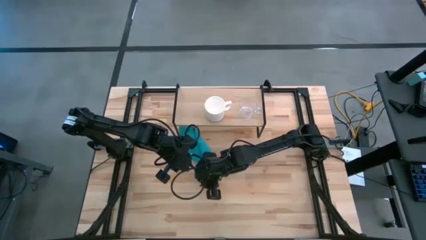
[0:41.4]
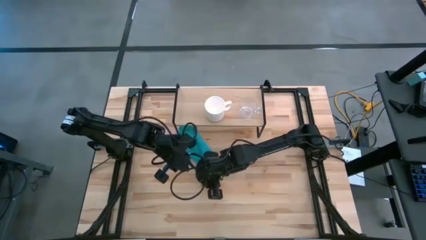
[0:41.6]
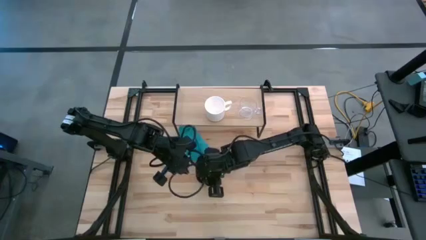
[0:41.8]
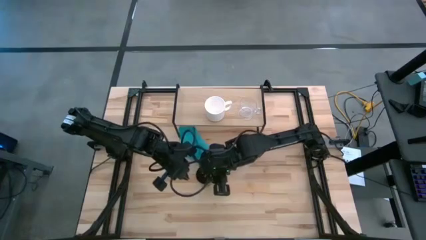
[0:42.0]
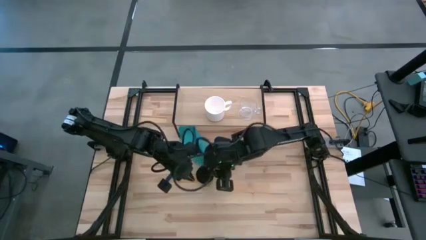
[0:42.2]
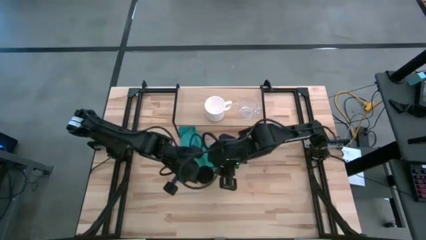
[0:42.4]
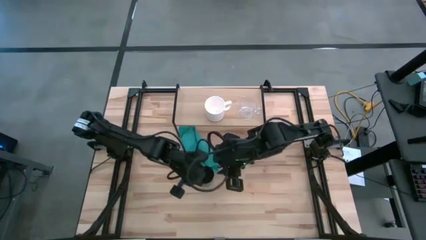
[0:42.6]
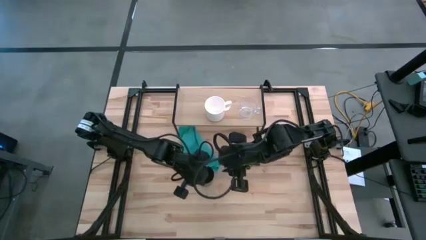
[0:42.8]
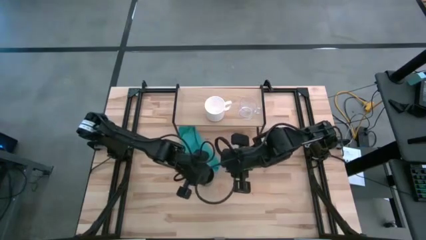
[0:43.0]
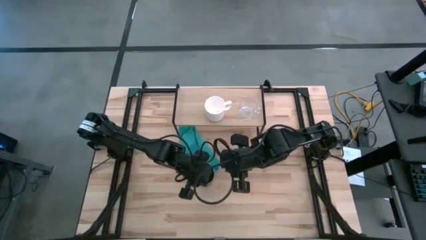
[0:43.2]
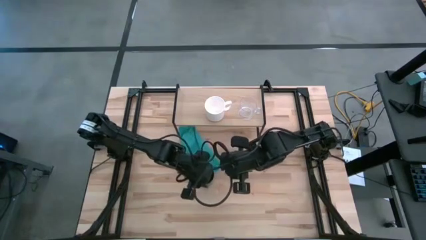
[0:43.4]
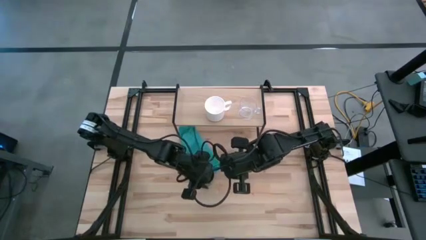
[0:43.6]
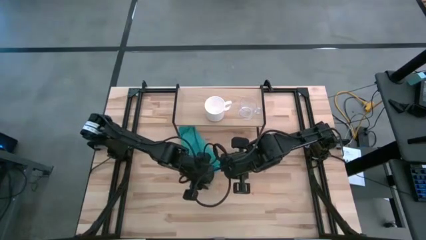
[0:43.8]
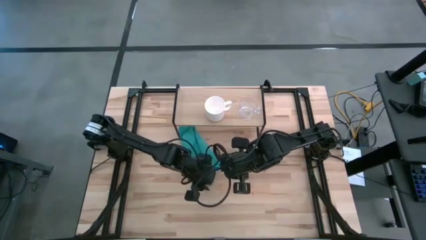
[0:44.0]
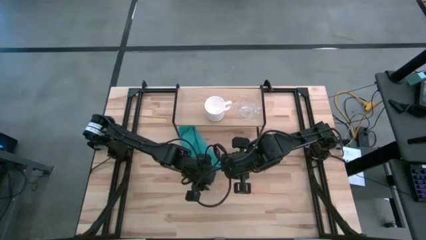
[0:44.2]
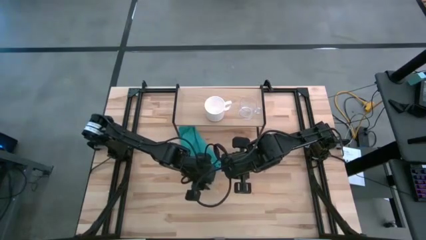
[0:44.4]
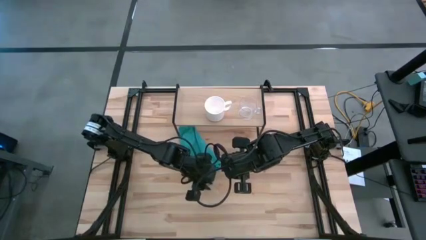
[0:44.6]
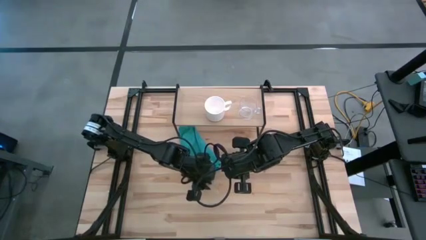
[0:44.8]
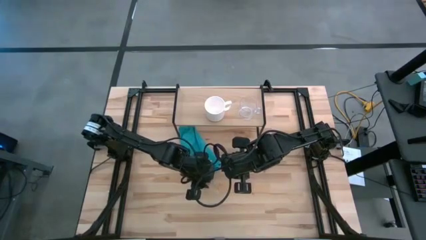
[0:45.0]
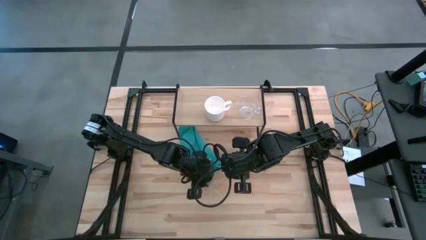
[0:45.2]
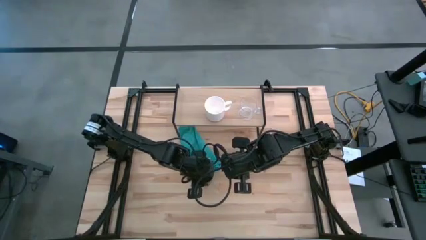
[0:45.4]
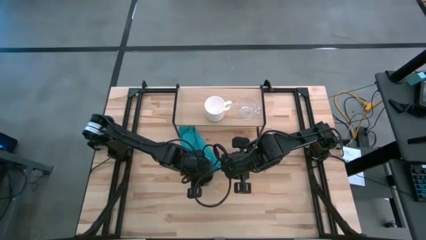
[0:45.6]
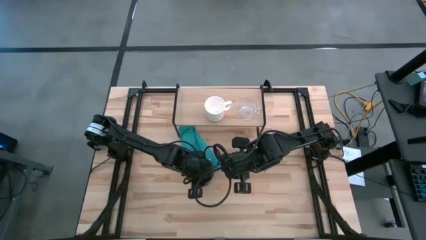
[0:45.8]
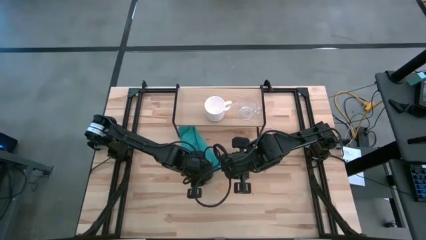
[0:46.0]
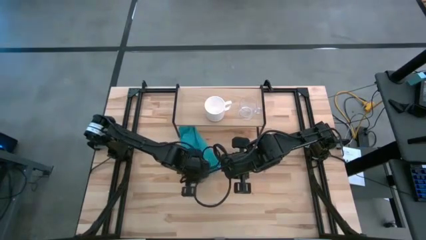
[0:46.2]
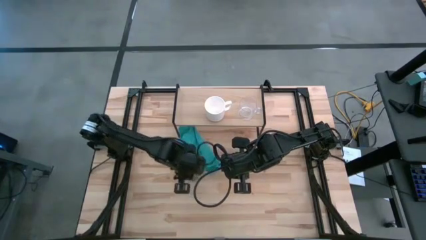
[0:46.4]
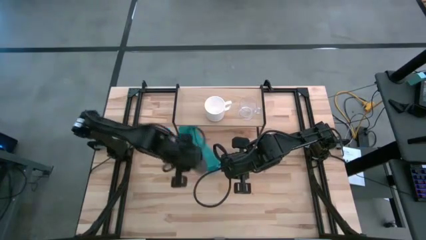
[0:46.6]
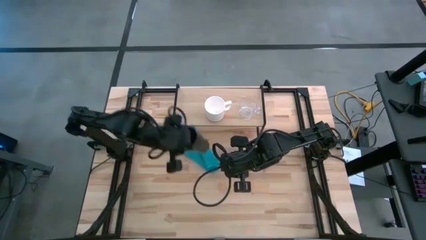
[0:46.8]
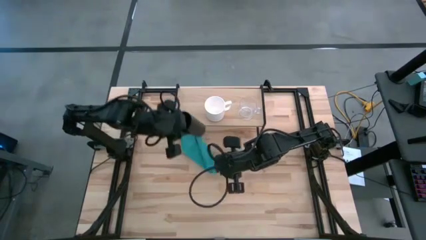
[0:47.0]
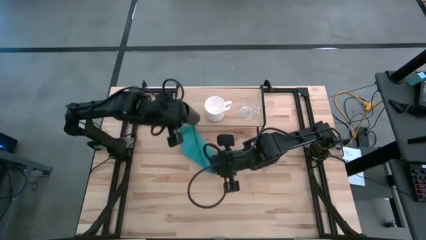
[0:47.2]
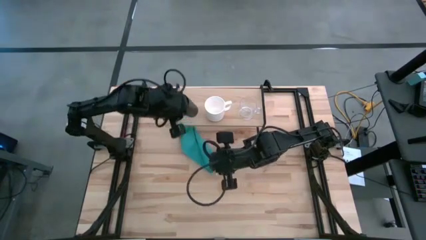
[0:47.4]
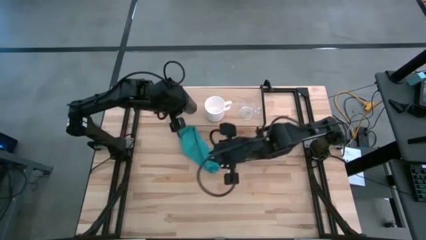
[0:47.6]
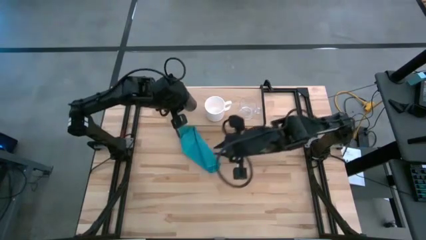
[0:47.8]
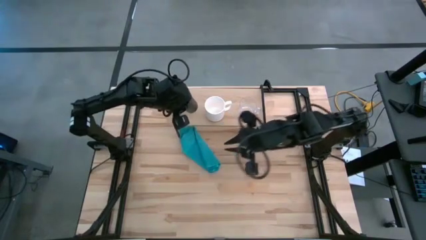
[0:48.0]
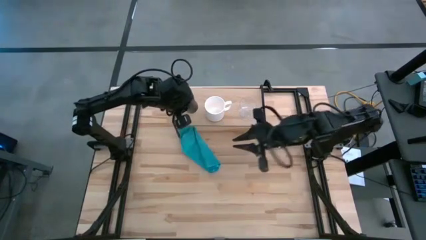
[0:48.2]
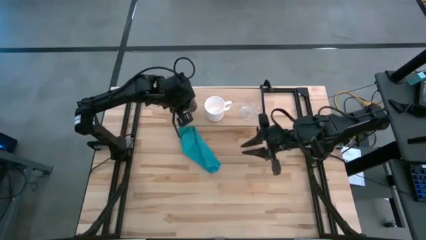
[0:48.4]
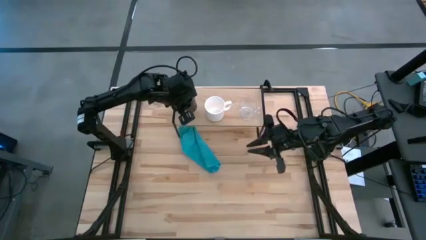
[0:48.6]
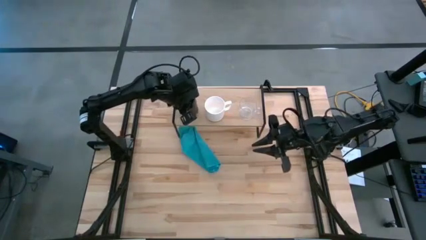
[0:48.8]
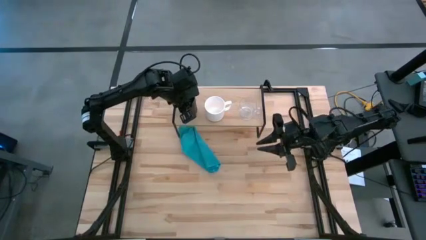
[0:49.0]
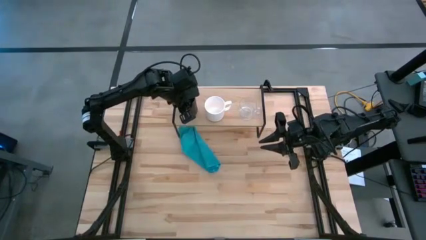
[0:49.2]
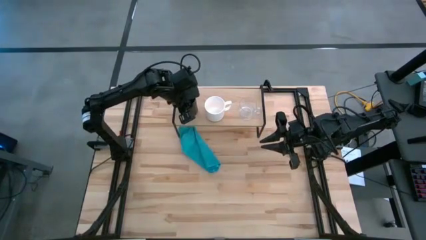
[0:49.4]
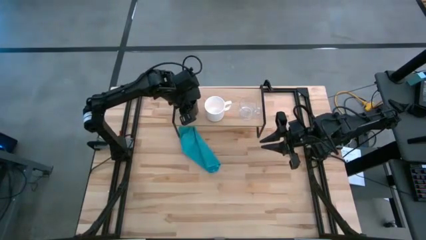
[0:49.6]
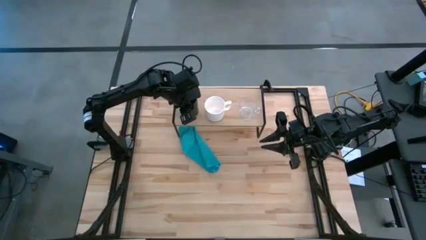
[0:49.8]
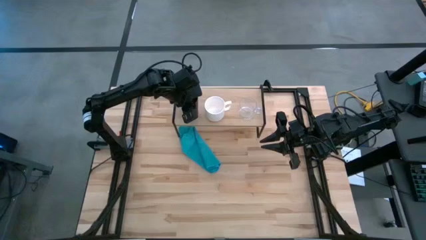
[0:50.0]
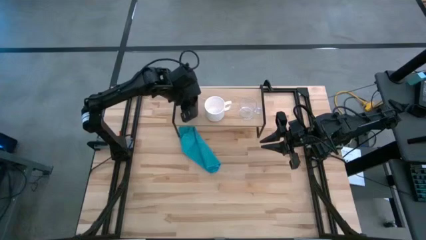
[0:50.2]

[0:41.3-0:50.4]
Task: Stack small to large cups/mugs on shelf
Put the black cup on the shelf

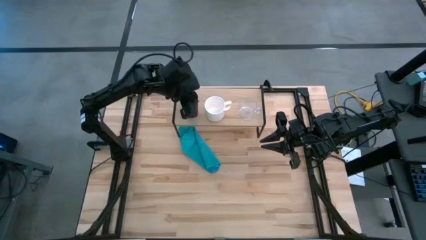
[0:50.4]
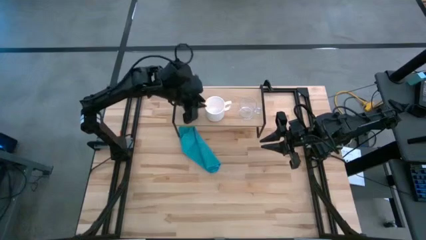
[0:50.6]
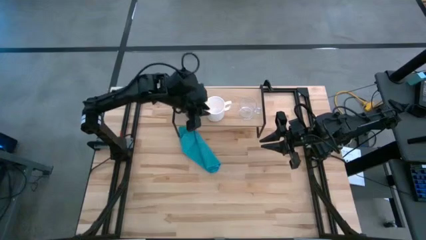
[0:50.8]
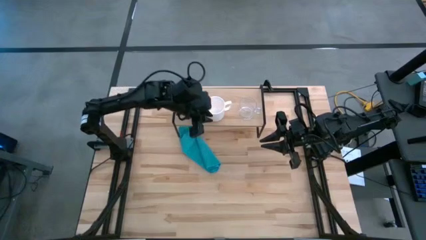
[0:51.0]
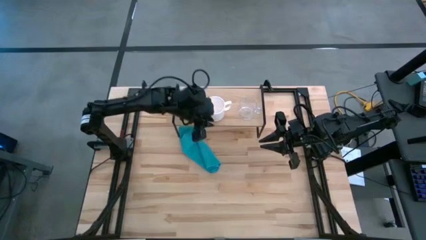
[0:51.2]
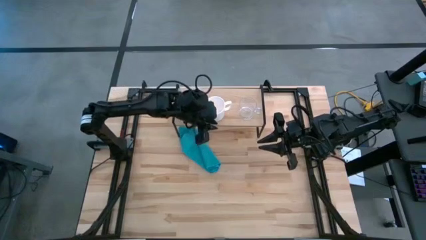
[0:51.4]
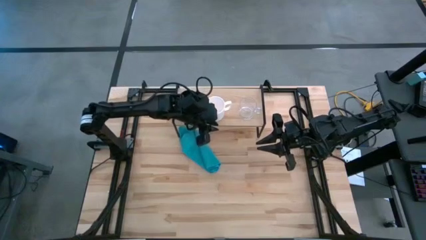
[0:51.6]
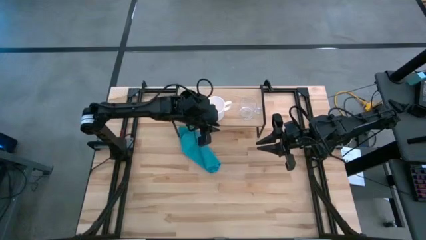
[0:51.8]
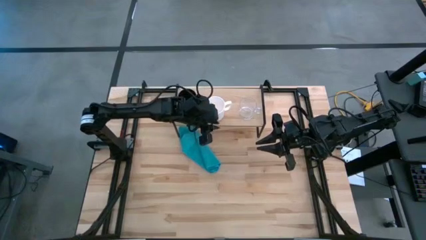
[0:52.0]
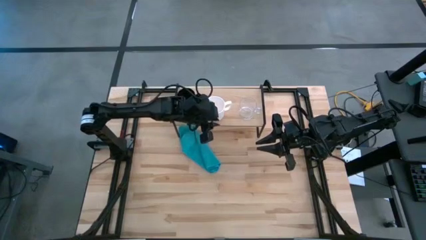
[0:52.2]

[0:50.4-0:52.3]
Adjust the black cup on the shelf

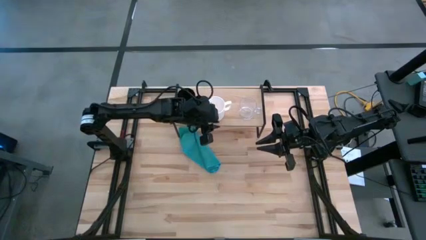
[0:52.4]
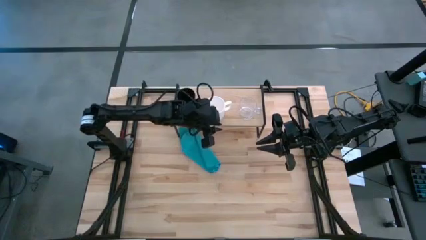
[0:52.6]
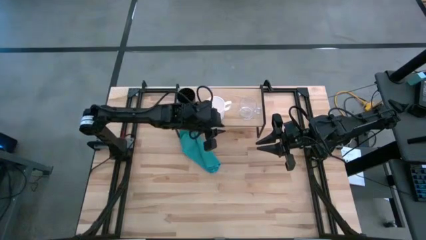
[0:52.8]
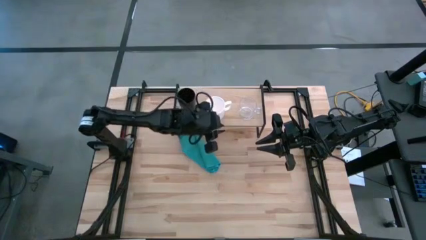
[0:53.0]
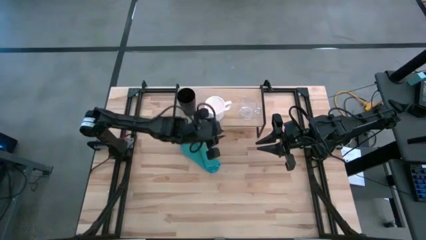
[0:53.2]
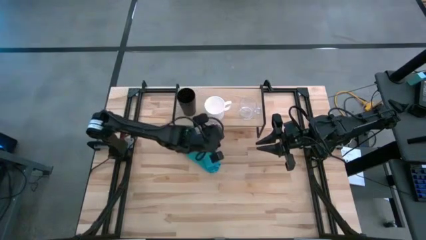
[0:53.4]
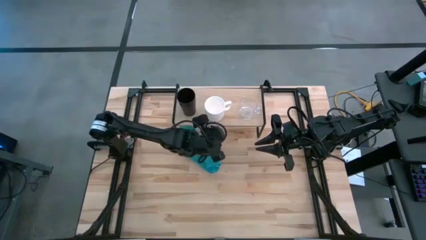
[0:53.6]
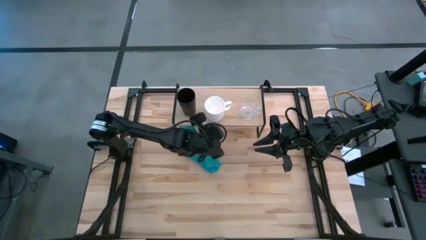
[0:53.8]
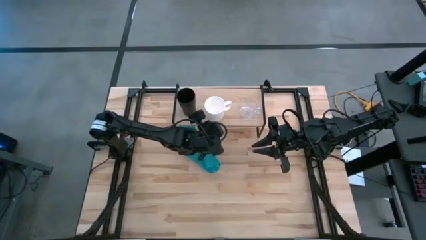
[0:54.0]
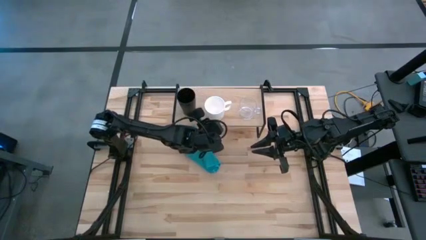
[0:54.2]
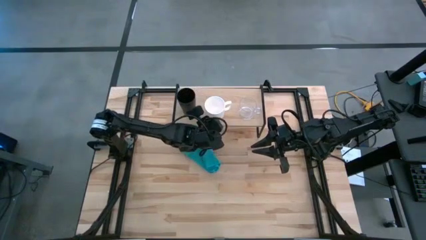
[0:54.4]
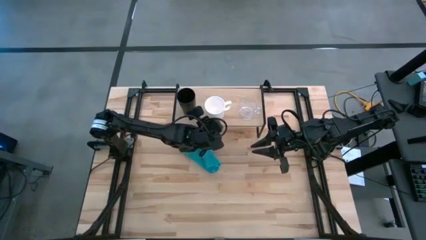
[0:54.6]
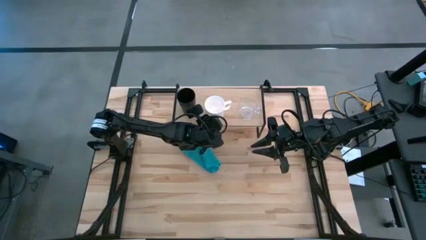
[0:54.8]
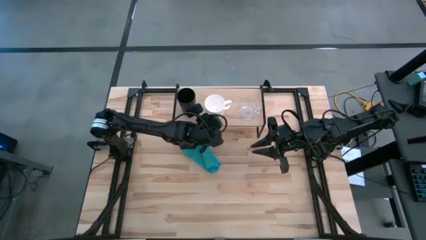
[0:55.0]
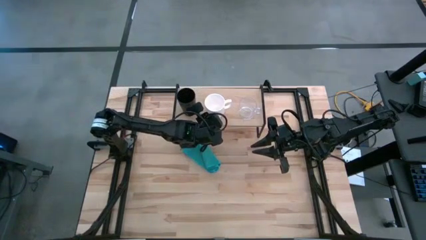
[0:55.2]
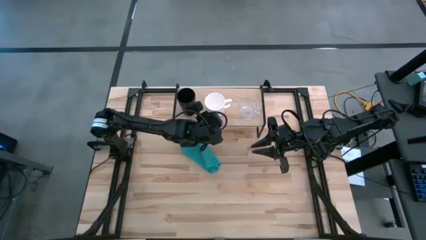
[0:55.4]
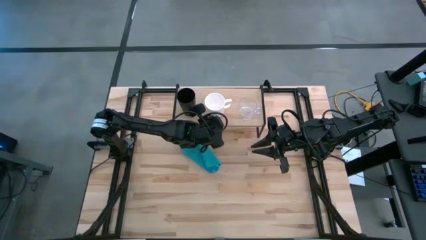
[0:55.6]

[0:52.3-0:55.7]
Adjust the white mug on the shelf

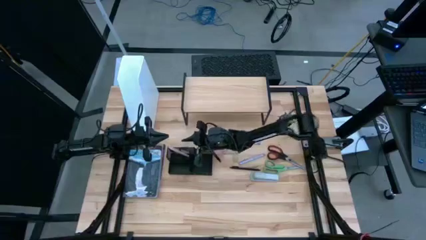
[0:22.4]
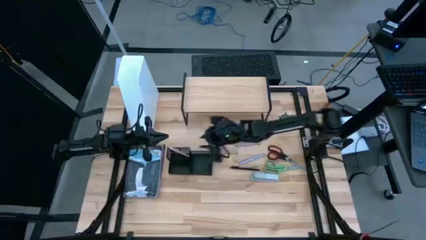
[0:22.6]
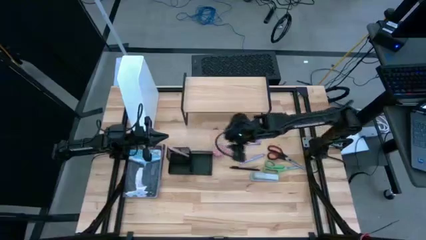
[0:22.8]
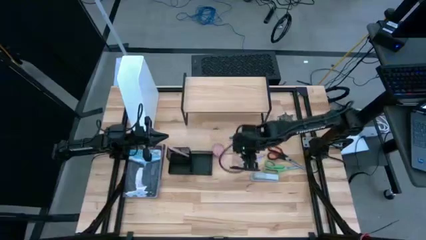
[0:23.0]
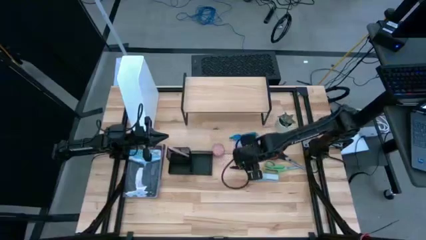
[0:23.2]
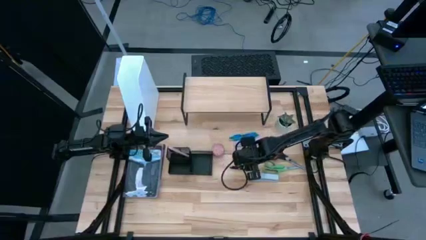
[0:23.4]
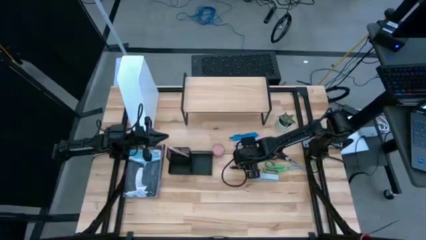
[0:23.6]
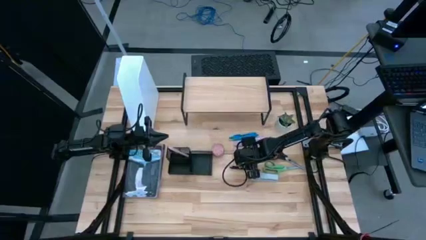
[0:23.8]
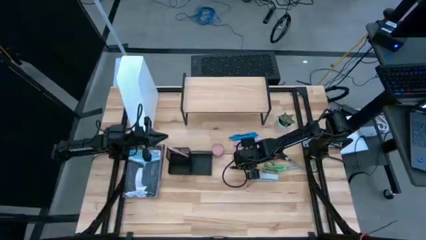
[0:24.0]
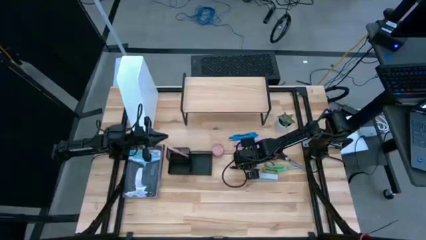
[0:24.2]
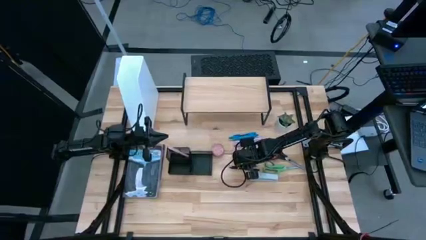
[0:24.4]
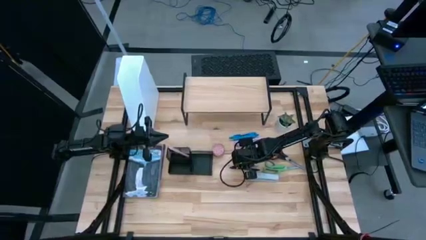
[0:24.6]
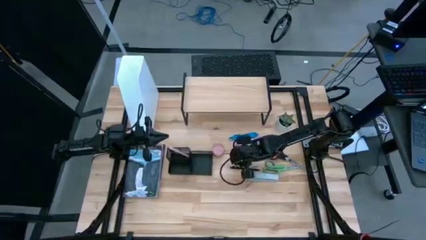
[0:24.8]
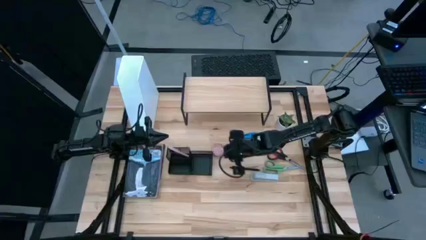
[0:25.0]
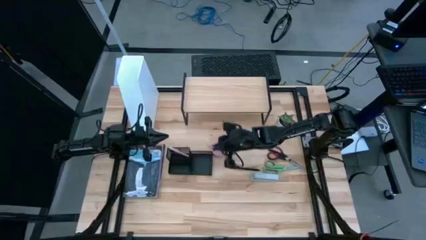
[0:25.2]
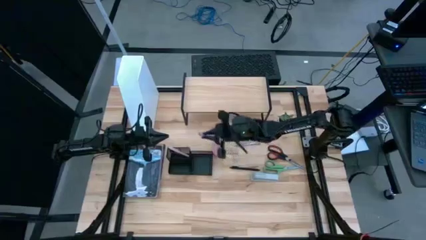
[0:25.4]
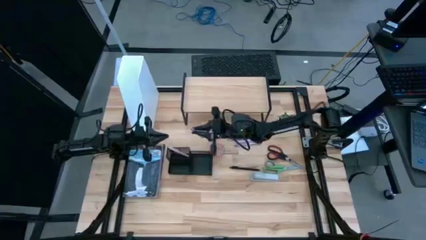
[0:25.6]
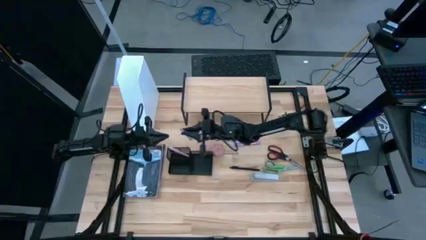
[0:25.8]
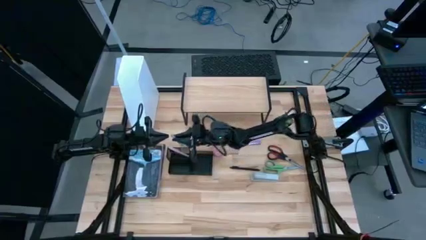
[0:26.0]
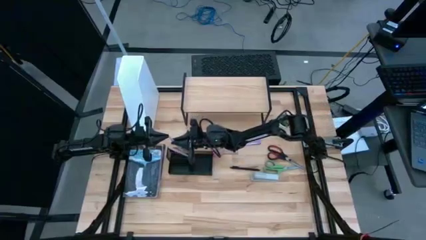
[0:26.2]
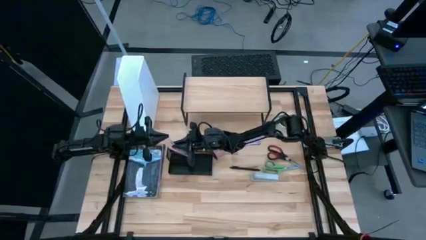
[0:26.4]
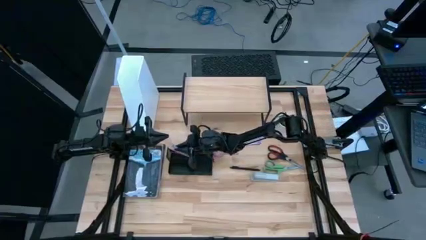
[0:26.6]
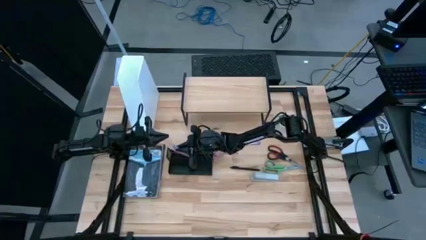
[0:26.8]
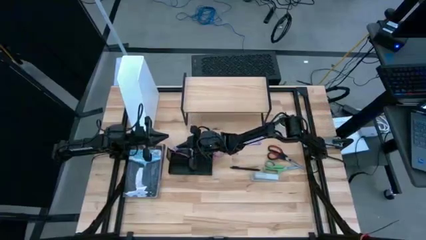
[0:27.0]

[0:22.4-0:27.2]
Task: Stock shelves
Put the light blue pen into the desk organizer
